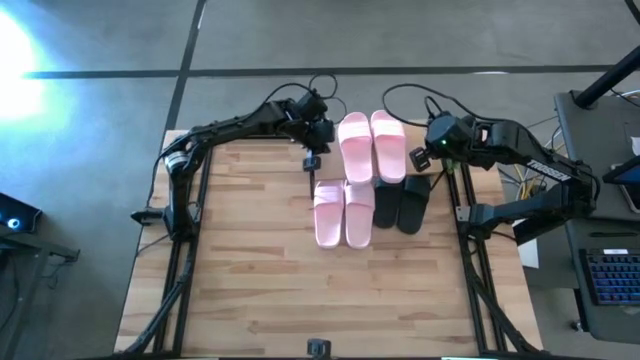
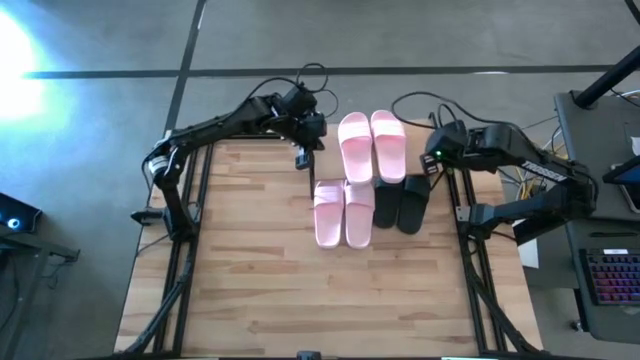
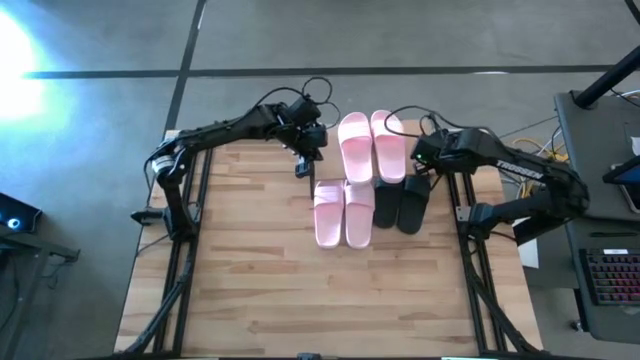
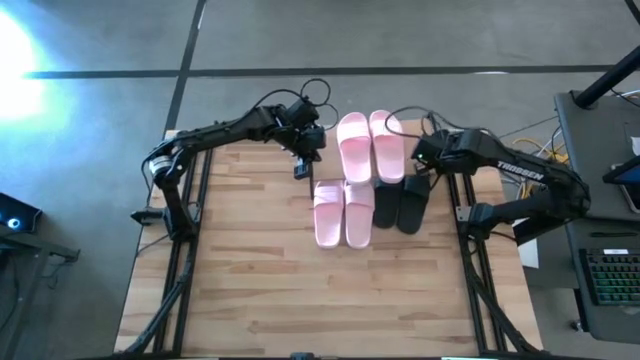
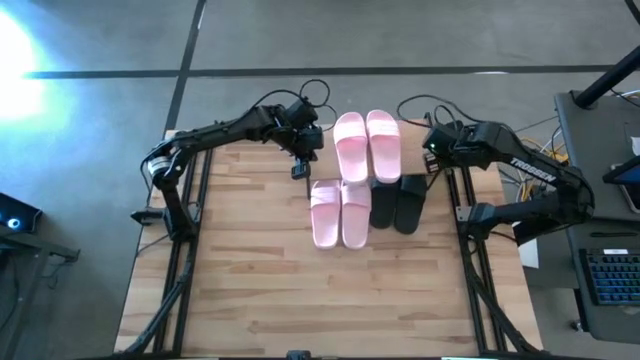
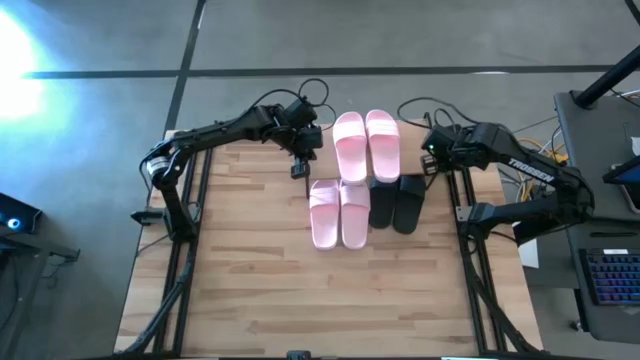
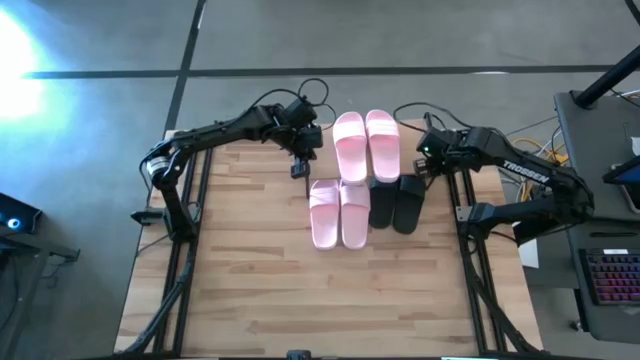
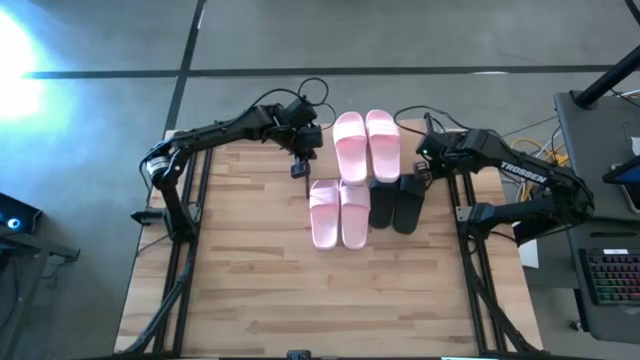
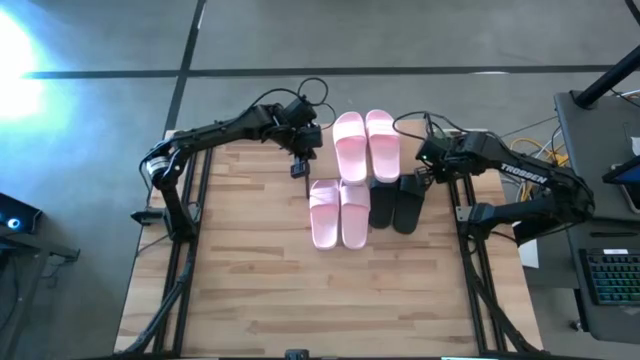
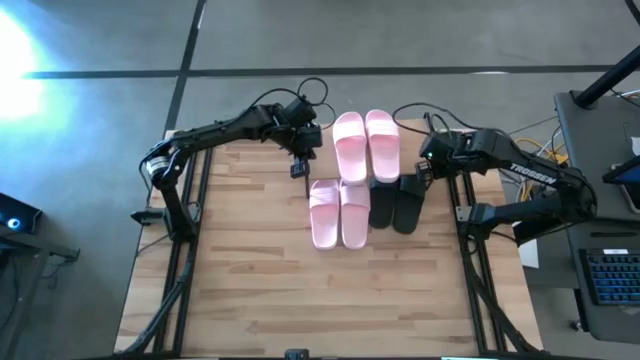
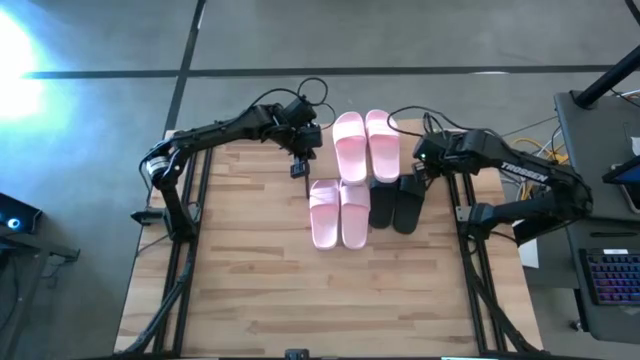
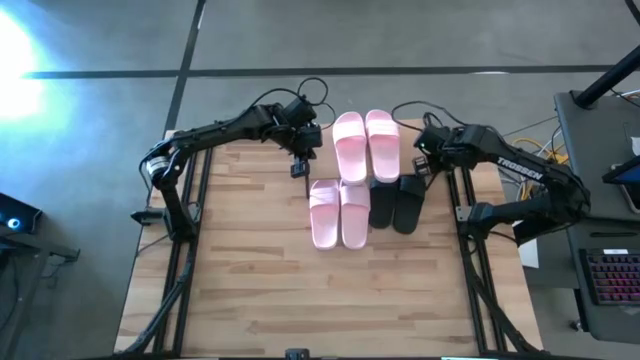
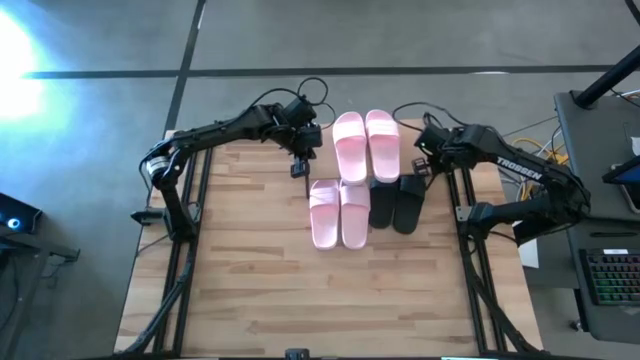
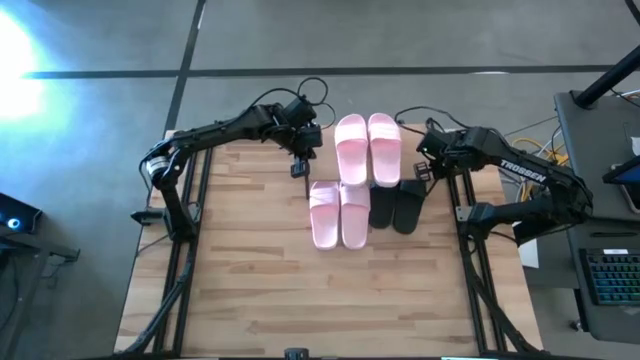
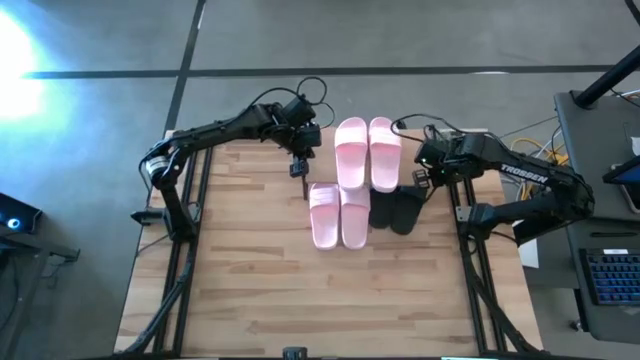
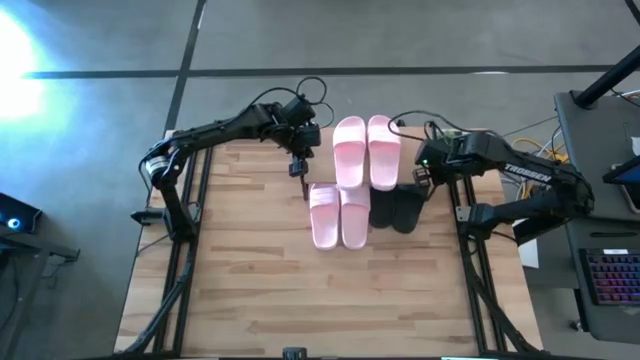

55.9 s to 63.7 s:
Task: Pick and place slides into the shelf
Adjust the shelf

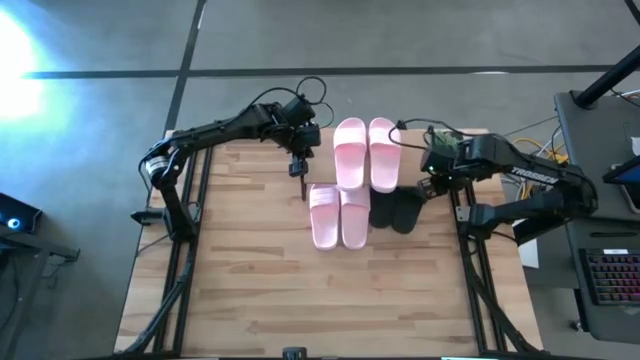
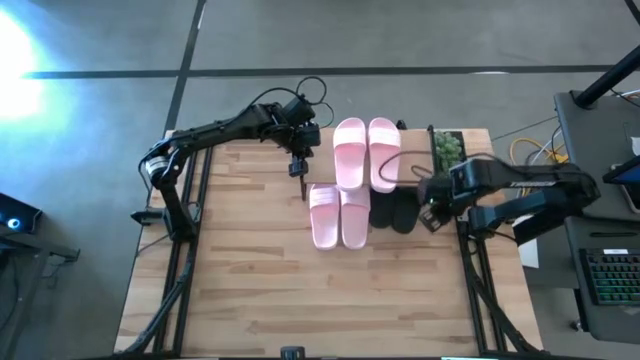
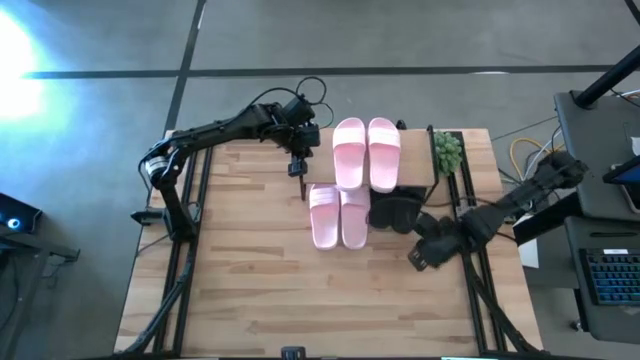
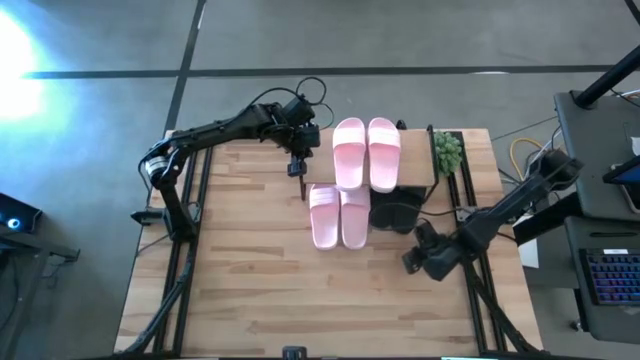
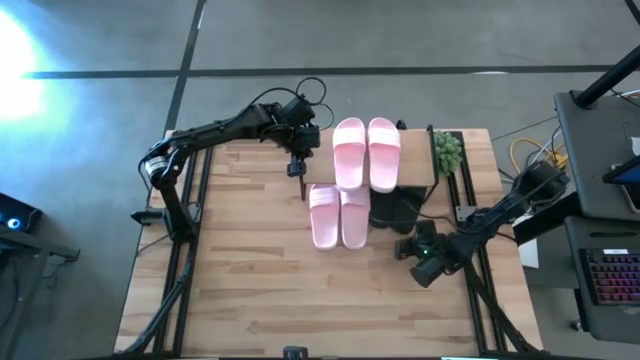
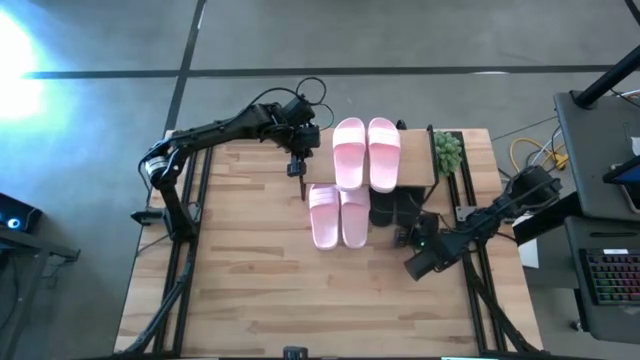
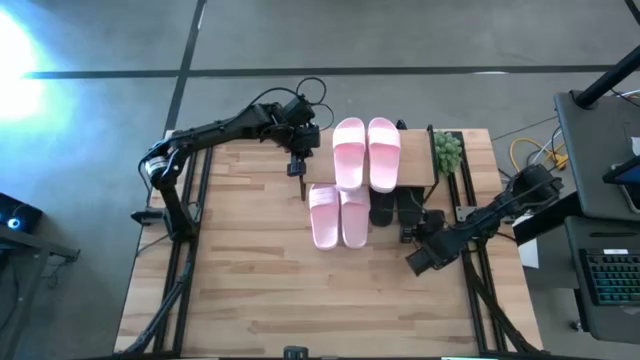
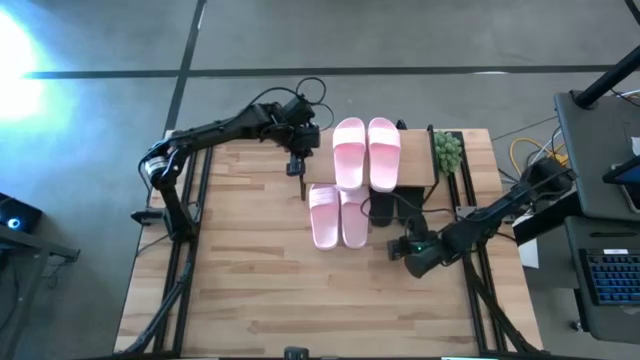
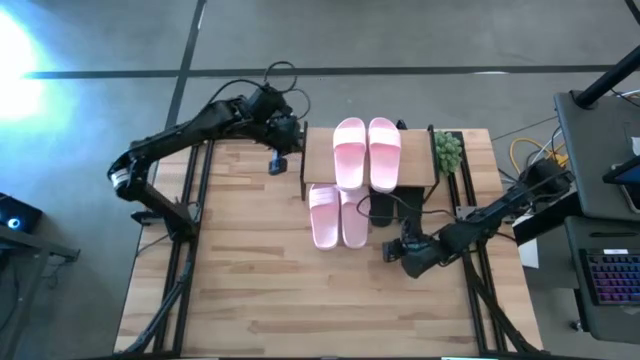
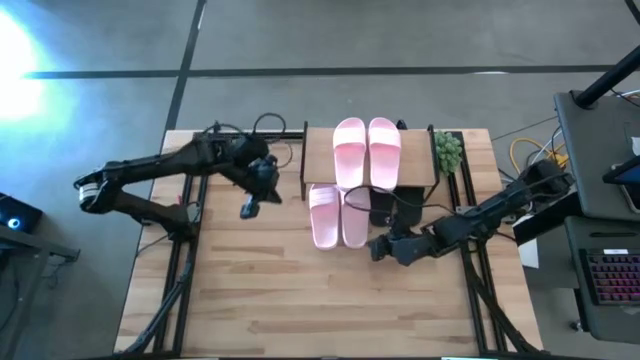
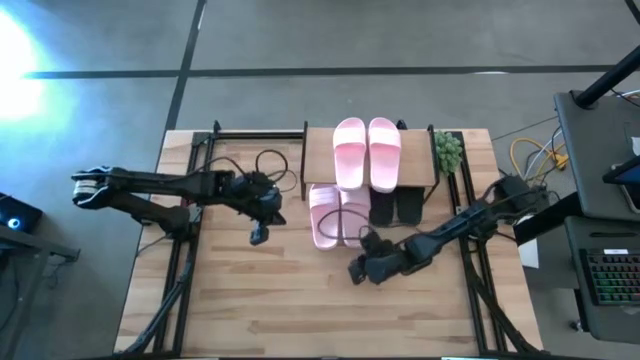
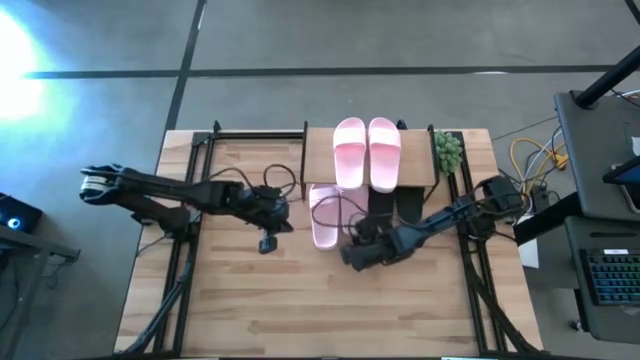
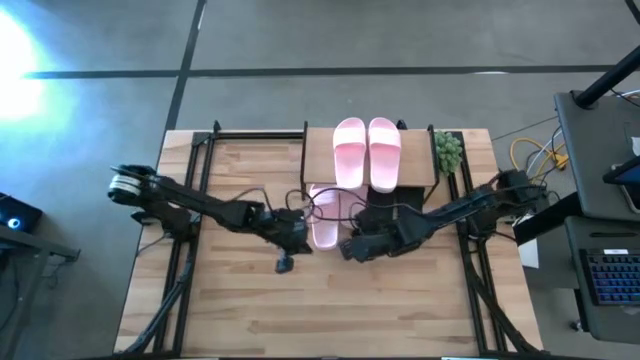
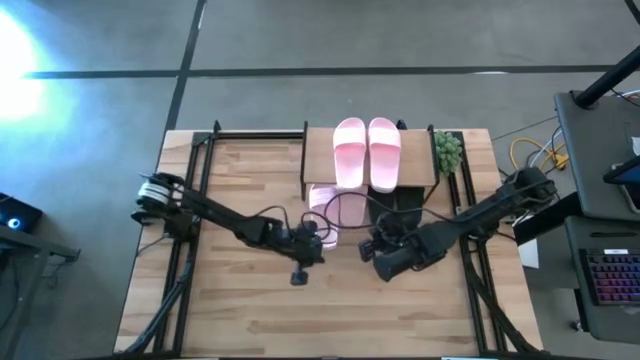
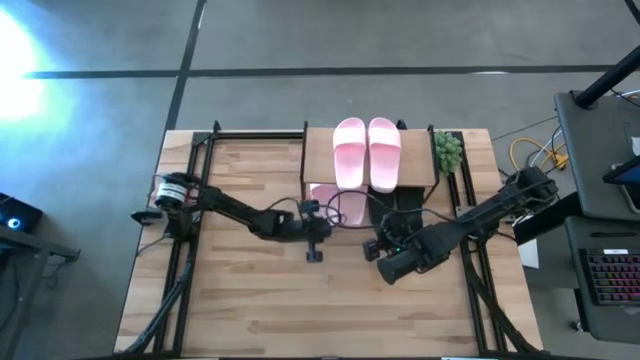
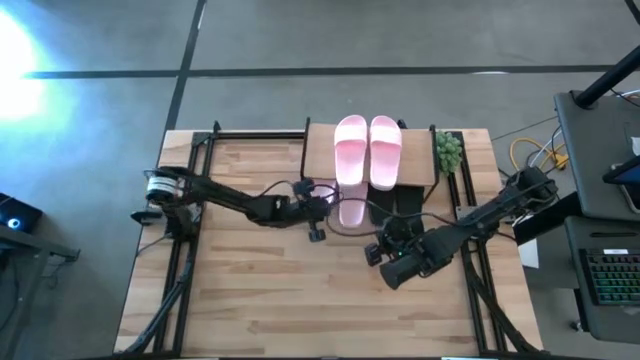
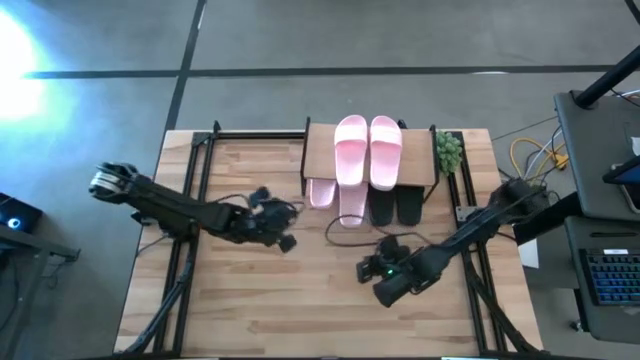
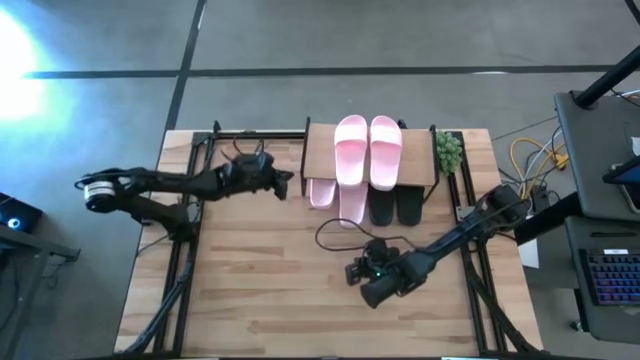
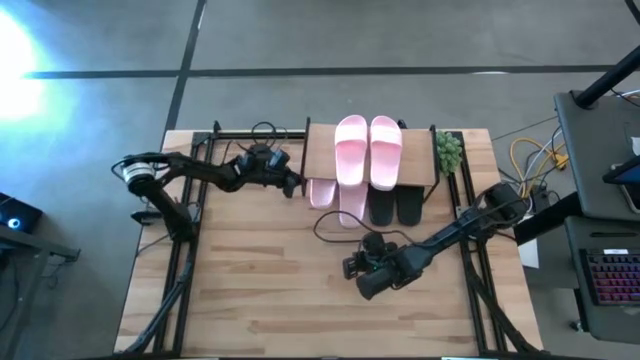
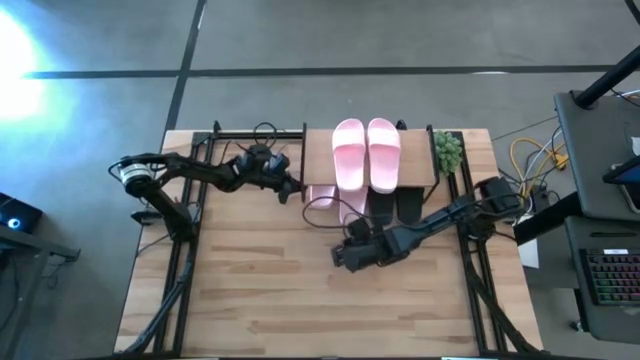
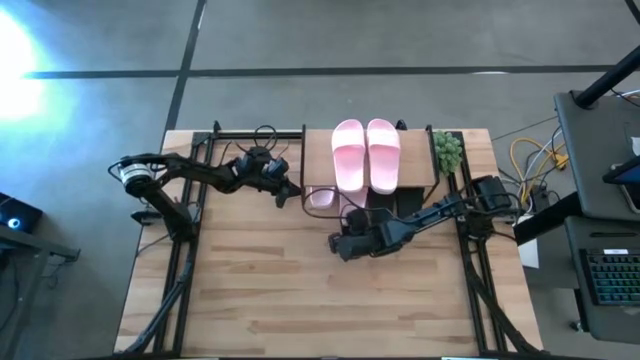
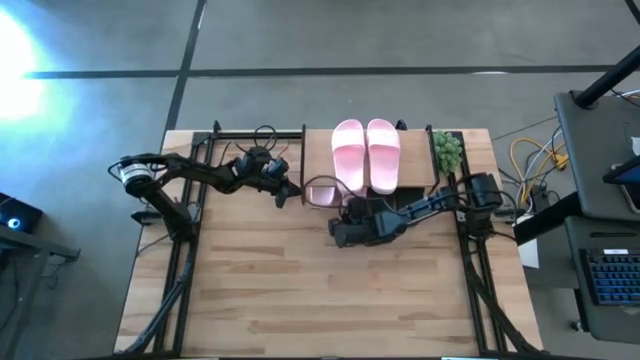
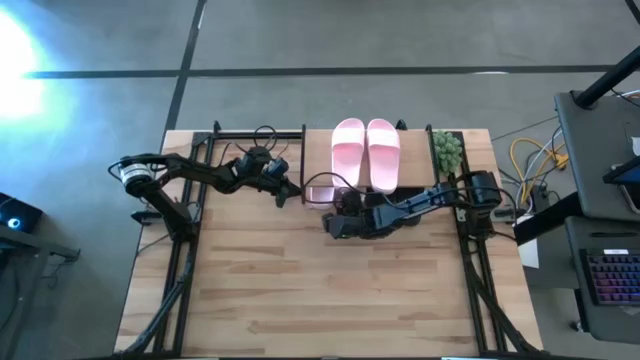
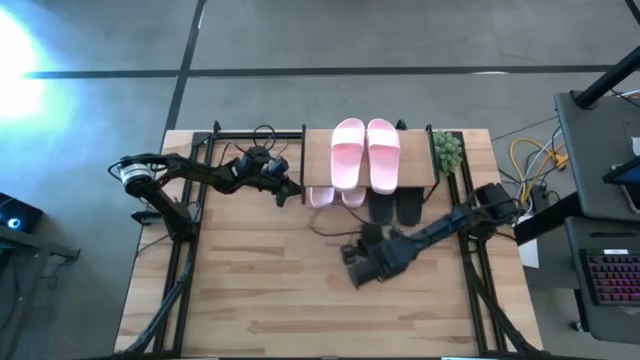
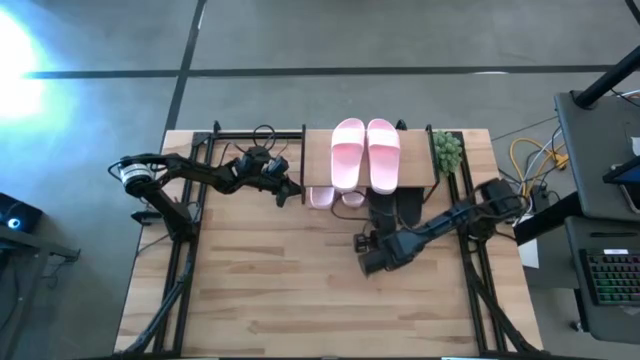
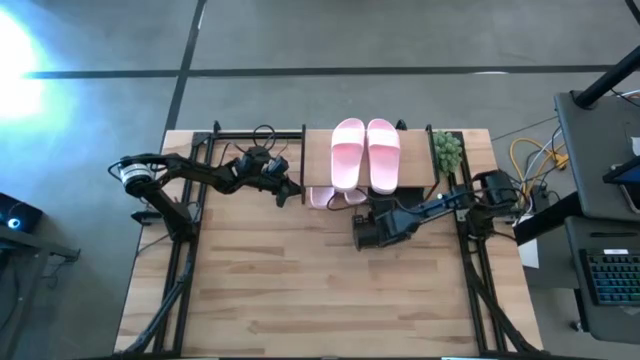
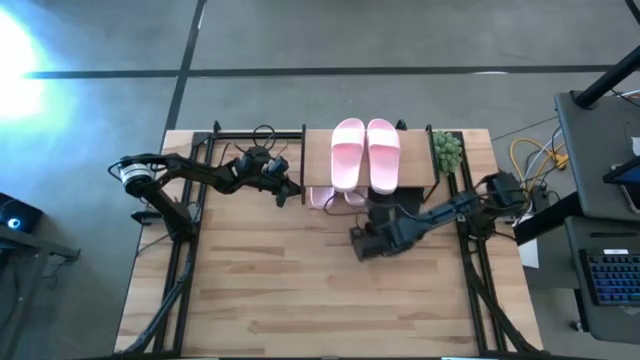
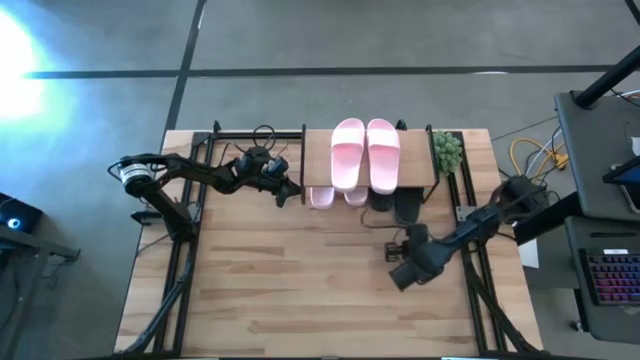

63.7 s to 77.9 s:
Adjust the pair of slippers
